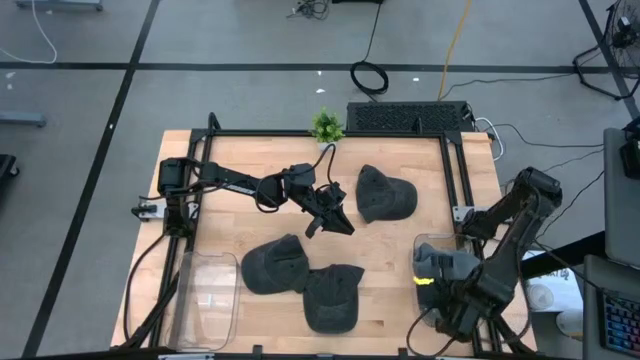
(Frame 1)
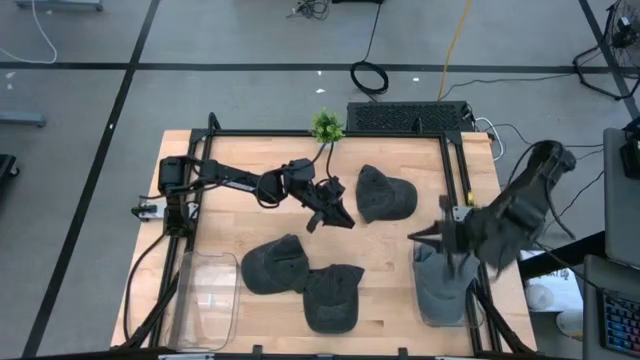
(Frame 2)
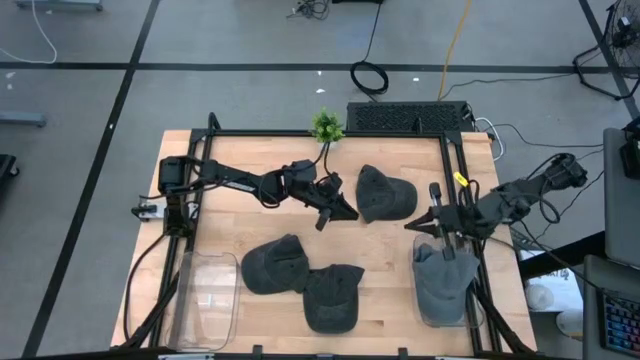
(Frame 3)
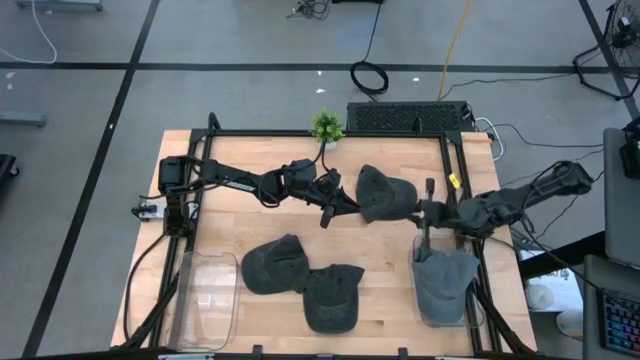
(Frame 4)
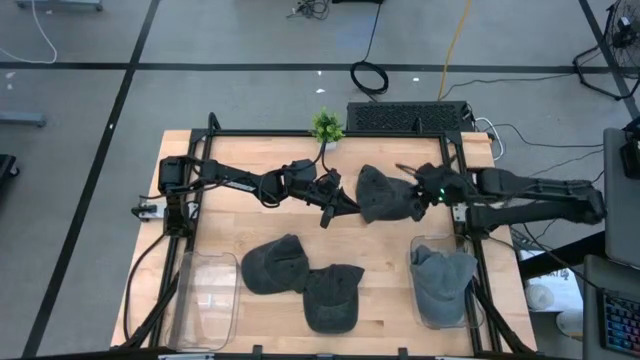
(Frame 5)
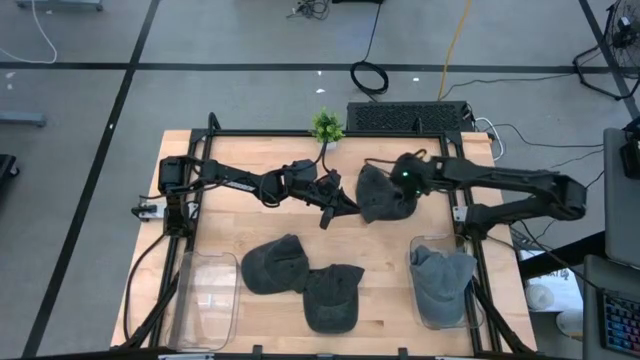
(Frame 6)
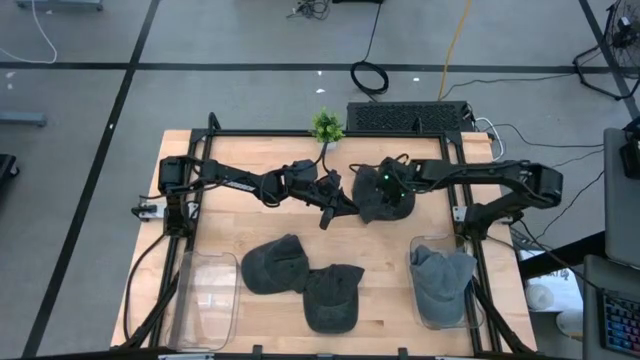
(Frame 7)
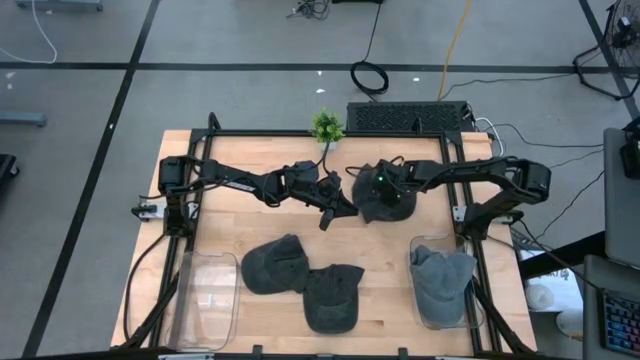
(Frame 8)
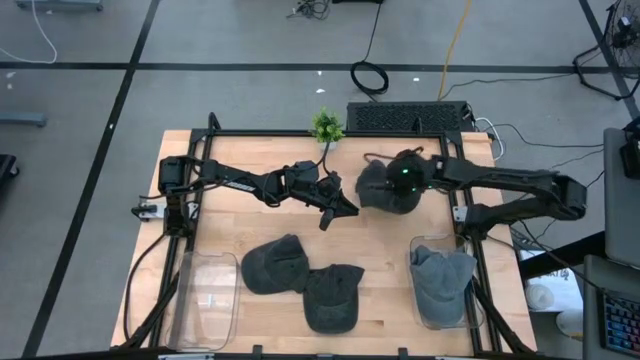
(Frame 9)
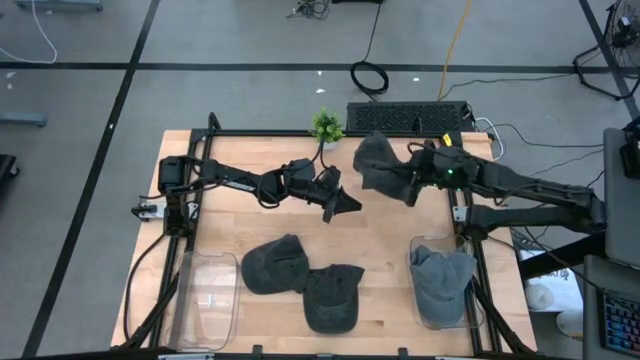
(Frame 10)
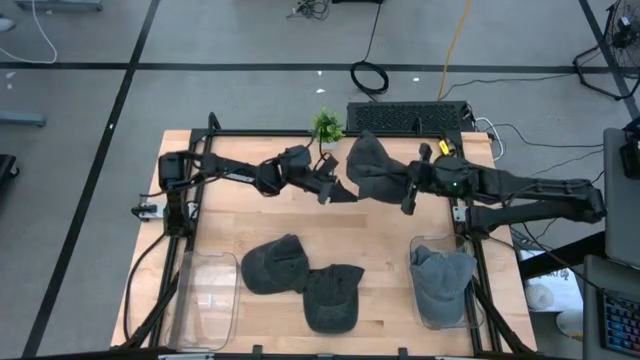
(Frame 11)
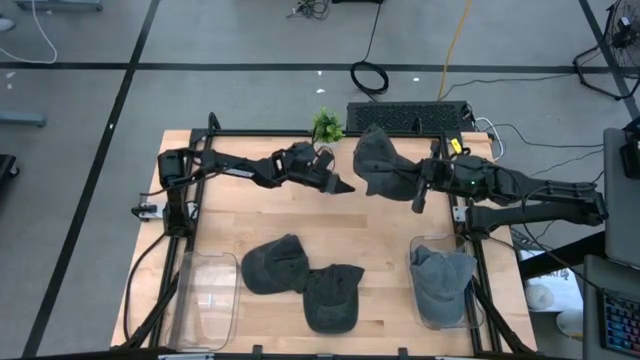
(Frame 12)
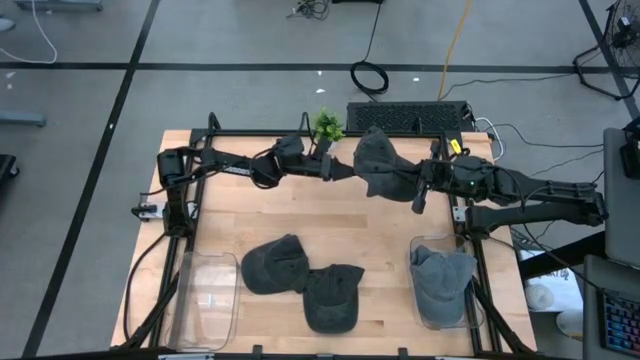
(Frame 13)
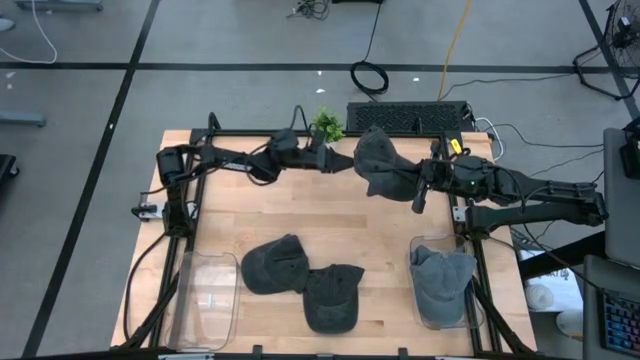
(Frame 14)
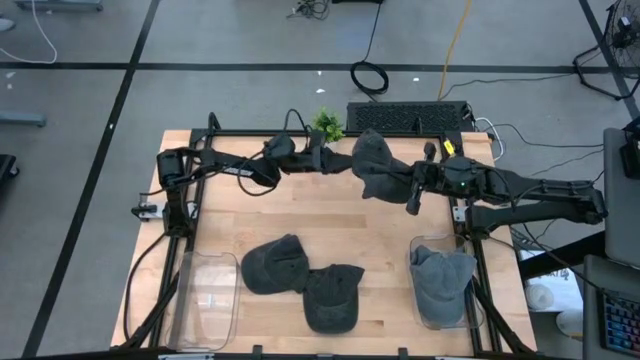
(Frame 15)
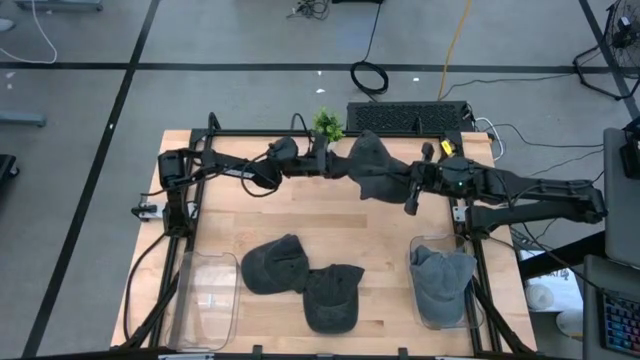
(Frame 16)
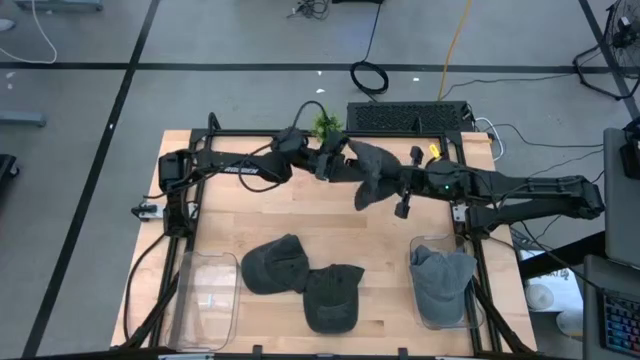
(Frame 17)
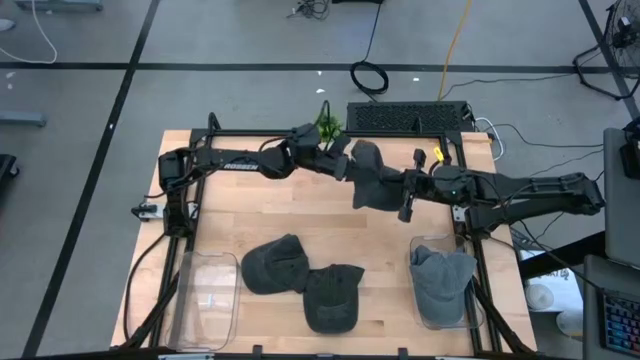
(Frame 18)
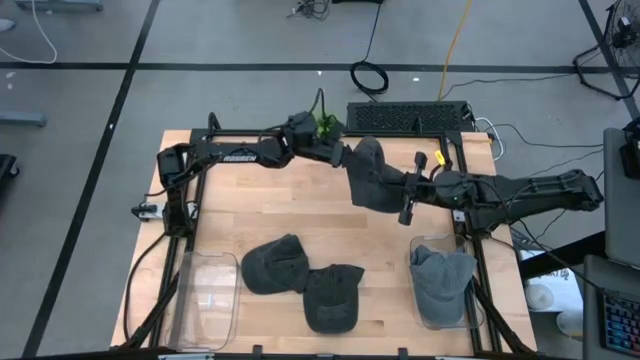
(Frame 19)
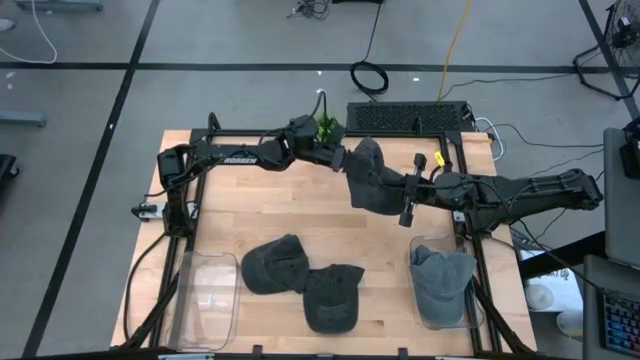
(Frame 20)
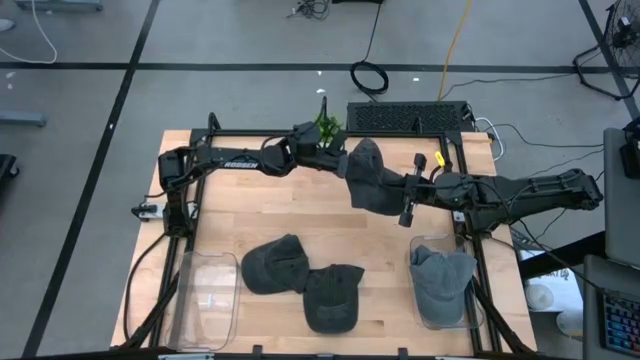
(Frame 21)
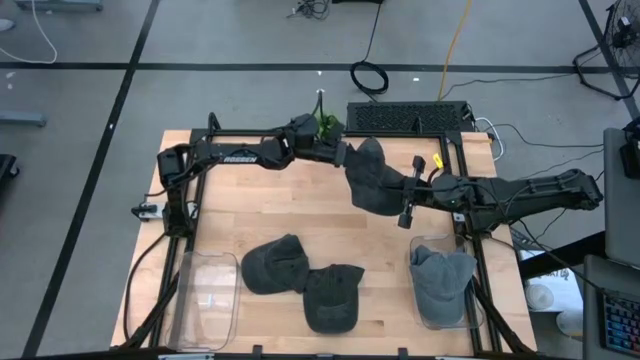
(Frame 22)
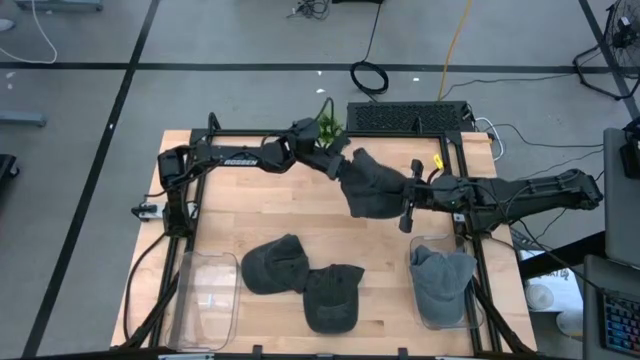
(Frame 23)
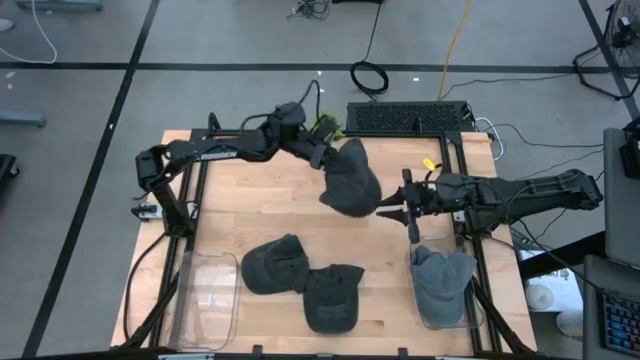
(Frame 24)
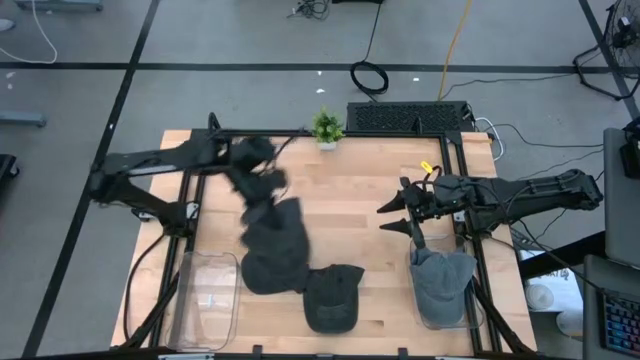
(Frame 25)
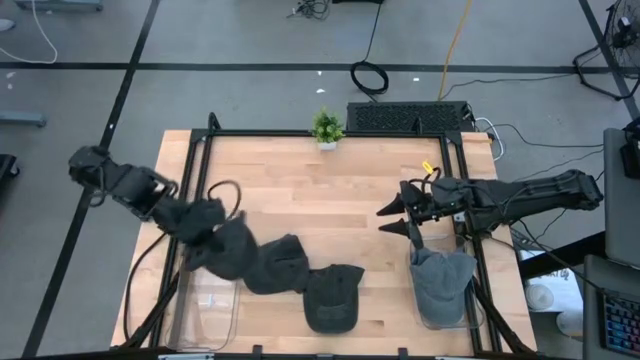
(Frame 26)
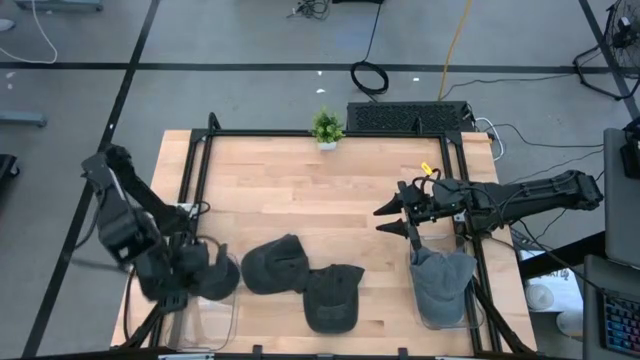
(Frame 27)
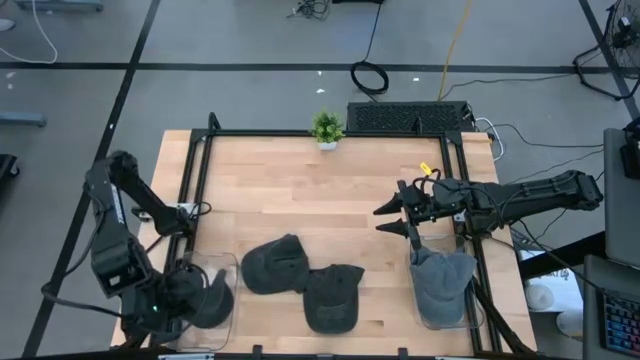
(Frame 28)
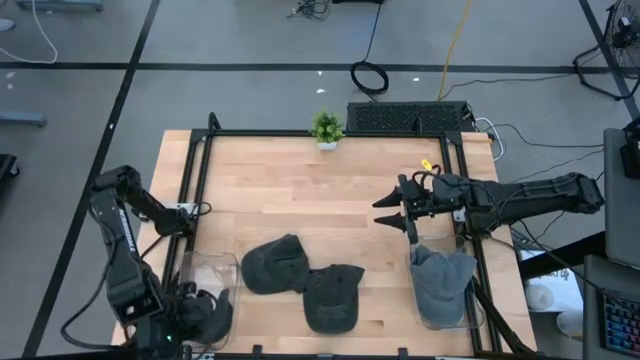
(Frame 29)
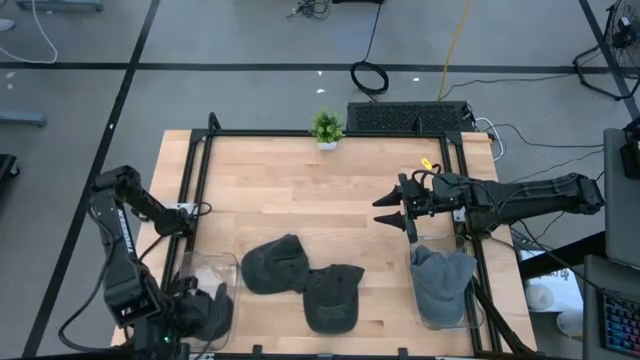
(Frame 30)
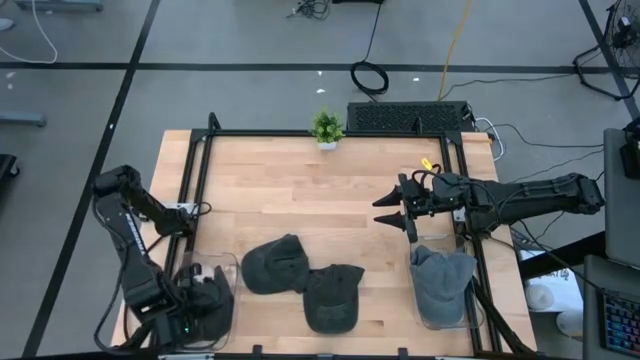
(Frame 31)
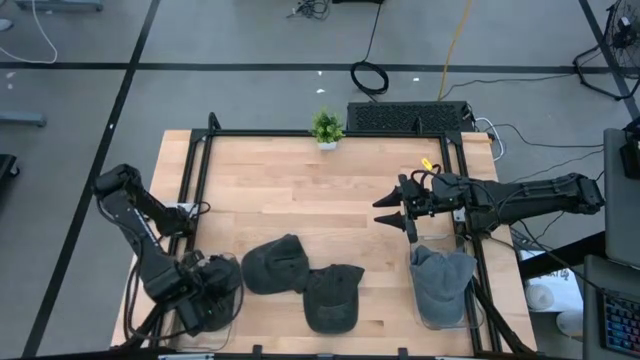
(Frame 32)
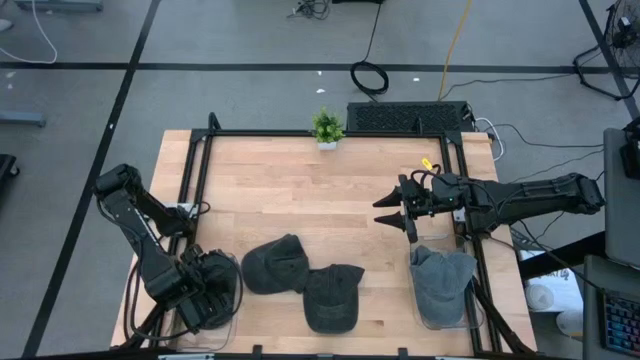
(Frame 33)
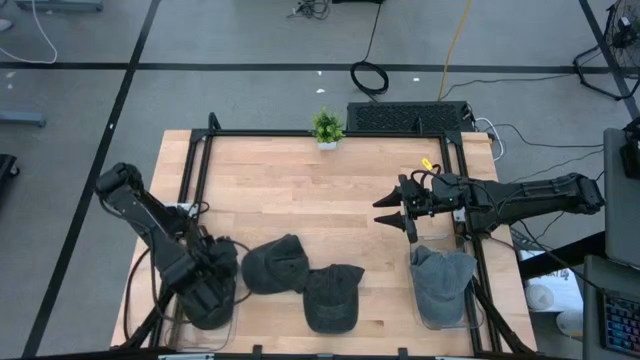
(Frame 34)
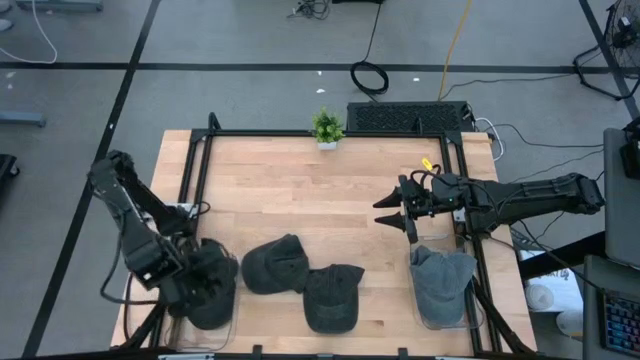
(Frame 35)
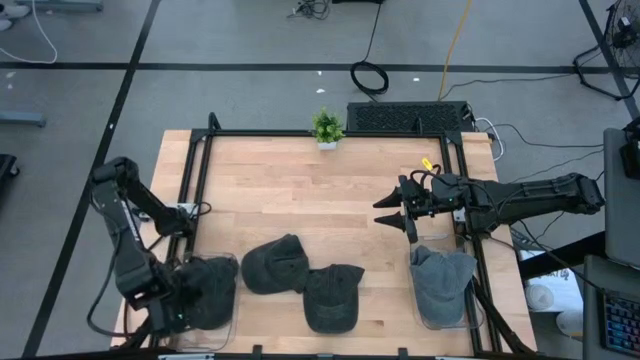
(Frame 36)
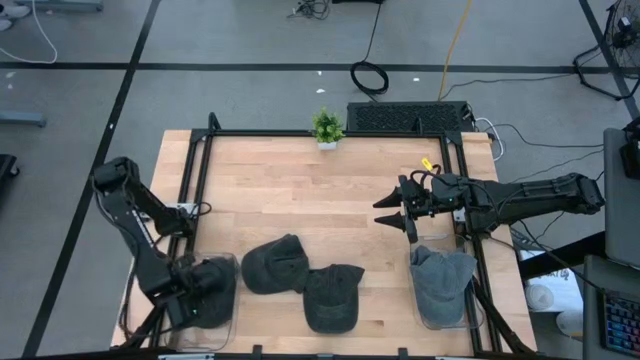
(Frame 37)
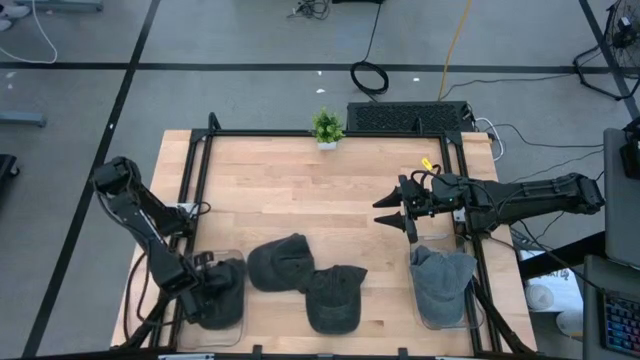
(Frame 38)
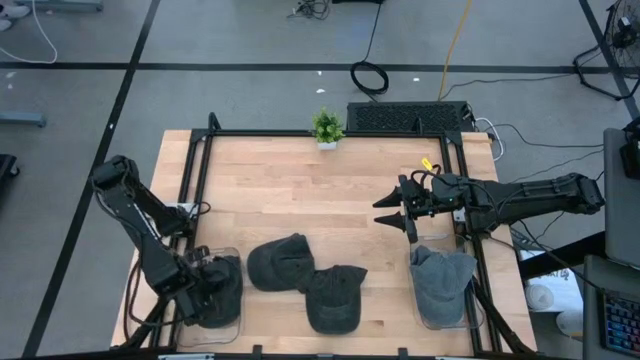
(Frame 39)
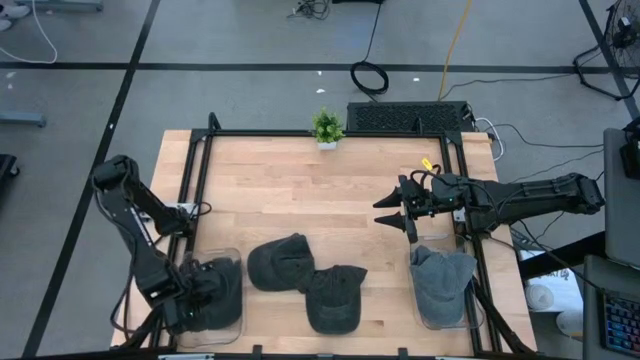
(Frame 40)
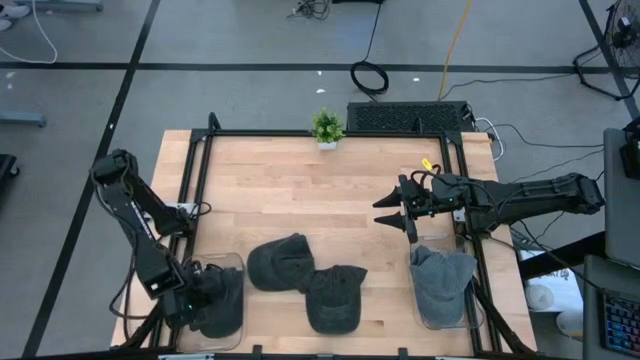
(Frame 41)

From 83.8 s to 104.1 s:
Task: Pick & Place hat
Put the top black cap into the left transparent bin
